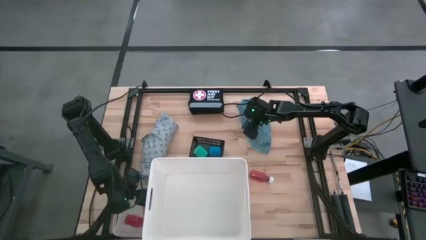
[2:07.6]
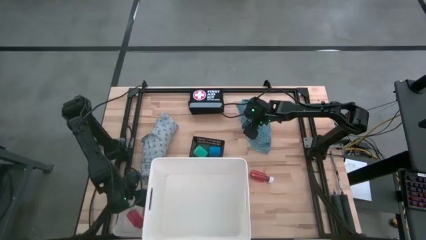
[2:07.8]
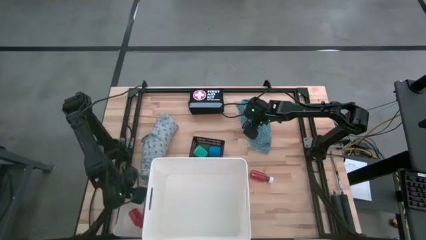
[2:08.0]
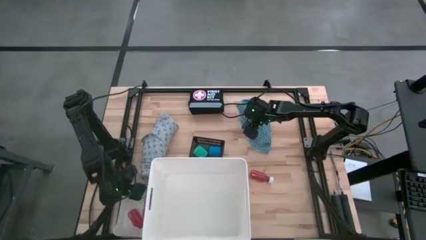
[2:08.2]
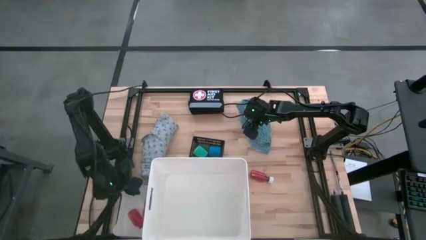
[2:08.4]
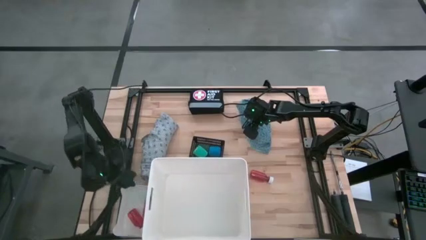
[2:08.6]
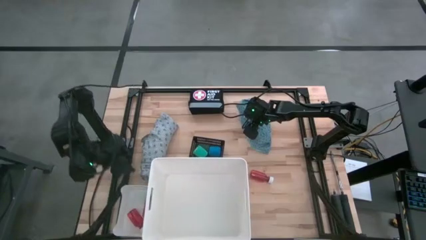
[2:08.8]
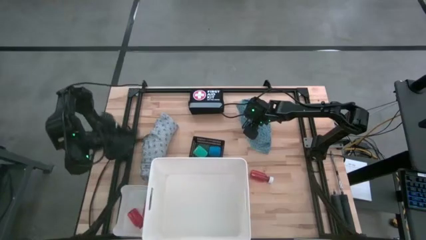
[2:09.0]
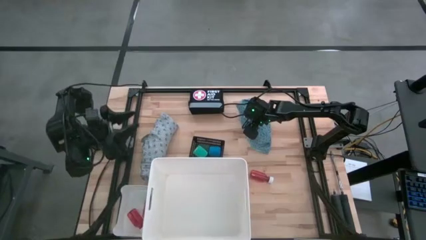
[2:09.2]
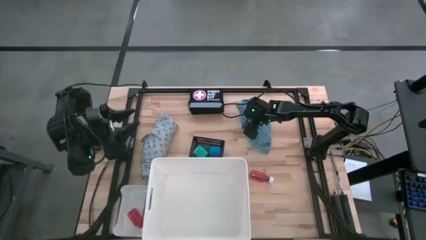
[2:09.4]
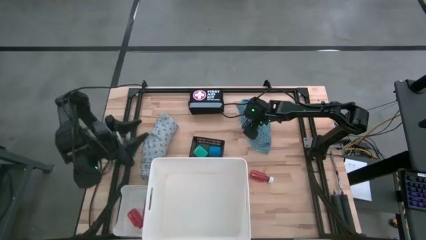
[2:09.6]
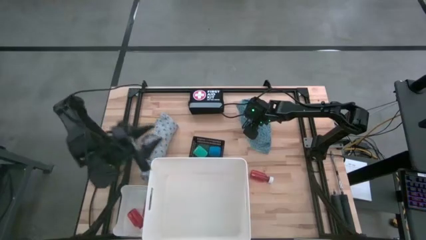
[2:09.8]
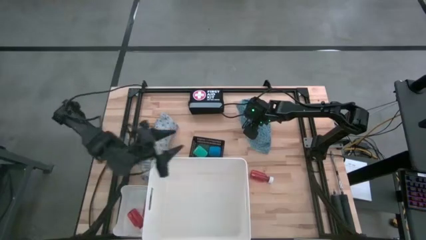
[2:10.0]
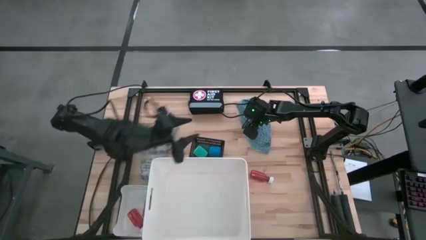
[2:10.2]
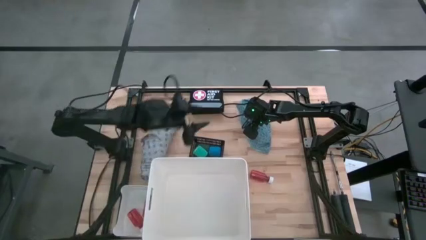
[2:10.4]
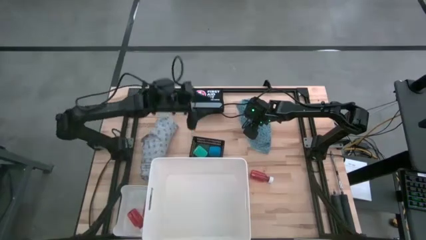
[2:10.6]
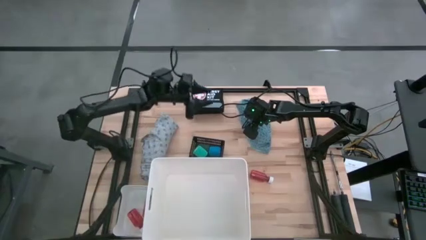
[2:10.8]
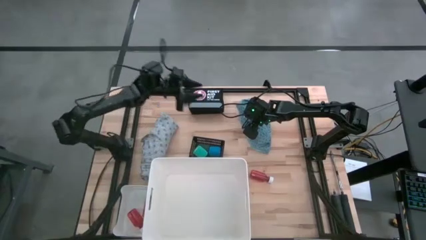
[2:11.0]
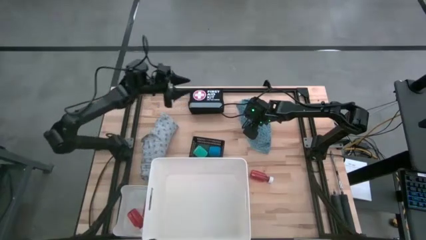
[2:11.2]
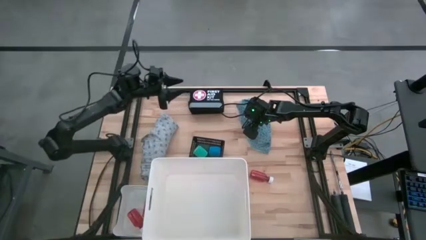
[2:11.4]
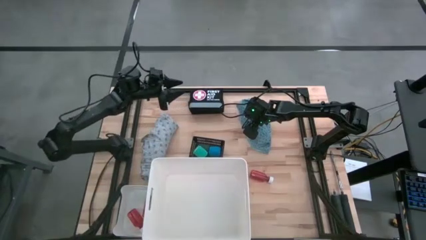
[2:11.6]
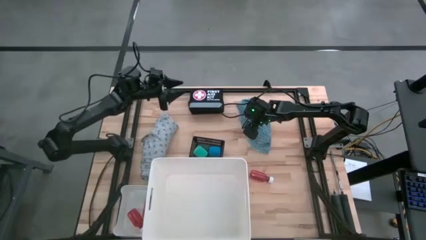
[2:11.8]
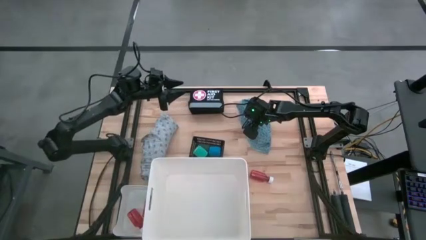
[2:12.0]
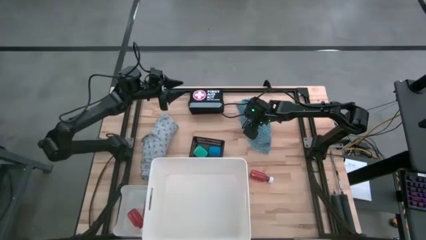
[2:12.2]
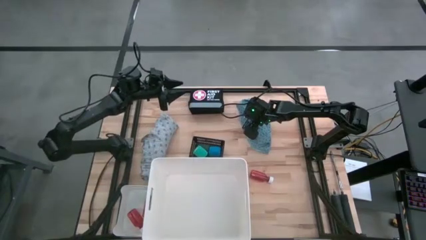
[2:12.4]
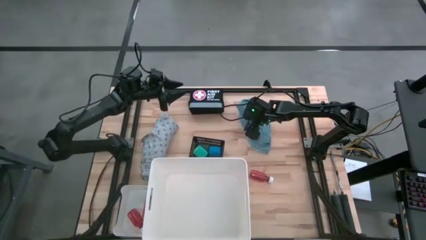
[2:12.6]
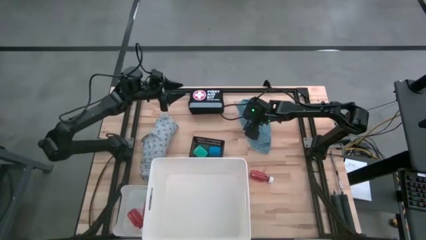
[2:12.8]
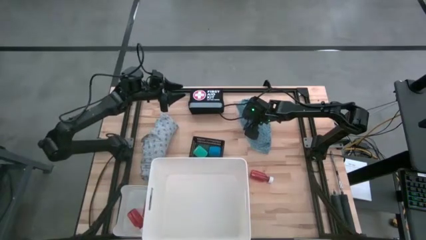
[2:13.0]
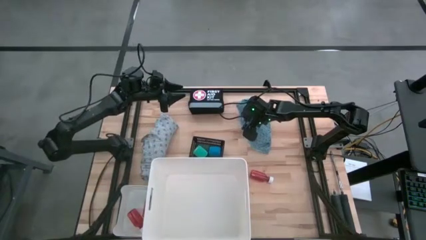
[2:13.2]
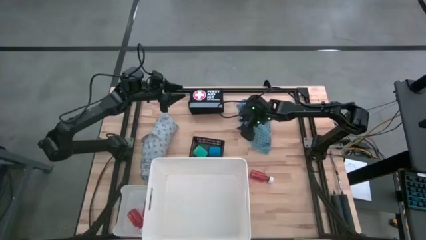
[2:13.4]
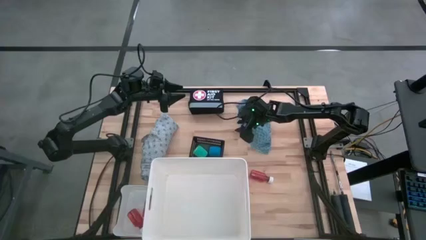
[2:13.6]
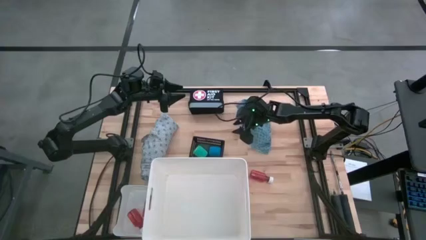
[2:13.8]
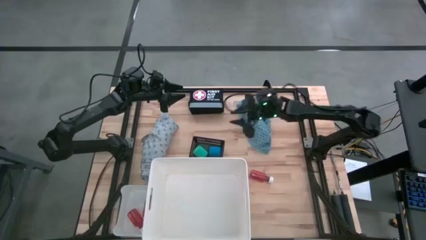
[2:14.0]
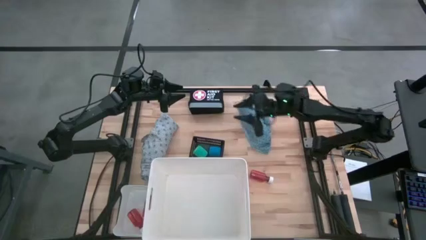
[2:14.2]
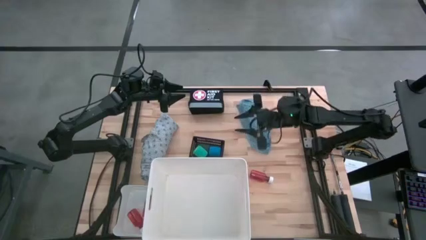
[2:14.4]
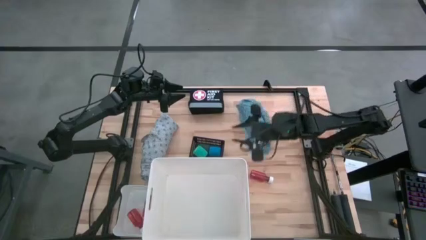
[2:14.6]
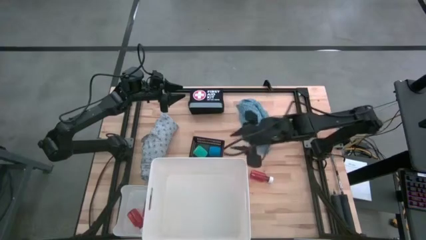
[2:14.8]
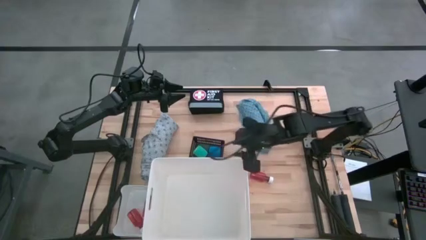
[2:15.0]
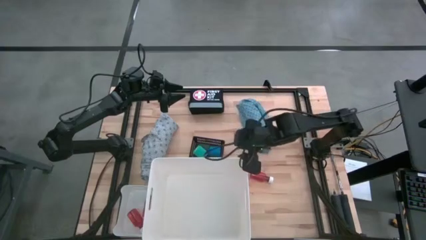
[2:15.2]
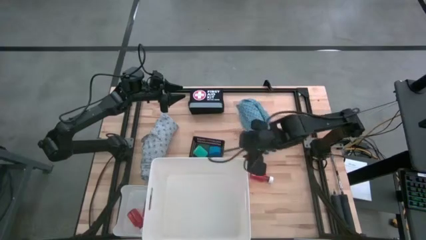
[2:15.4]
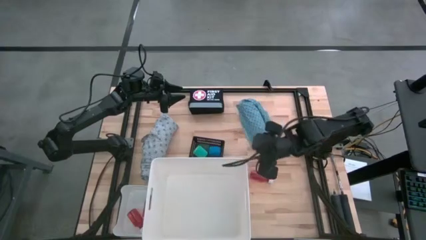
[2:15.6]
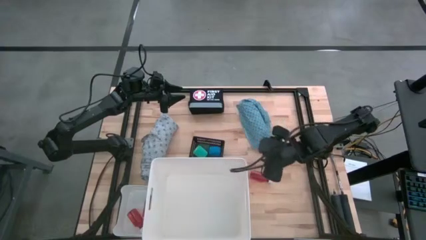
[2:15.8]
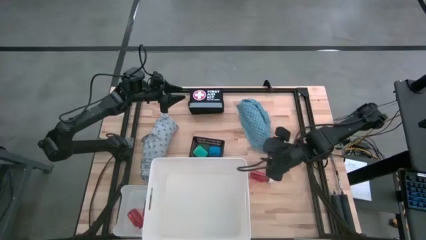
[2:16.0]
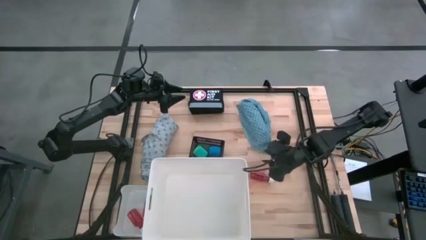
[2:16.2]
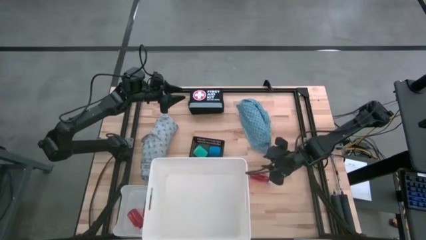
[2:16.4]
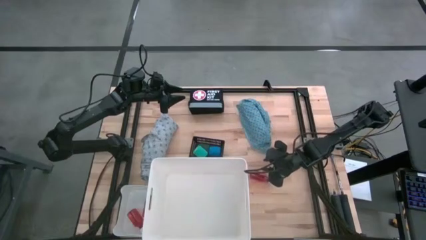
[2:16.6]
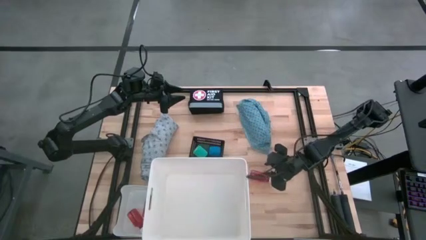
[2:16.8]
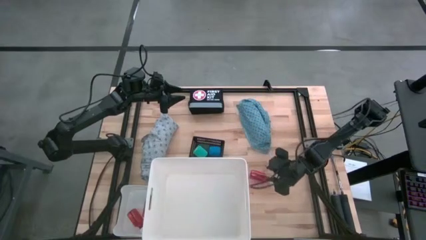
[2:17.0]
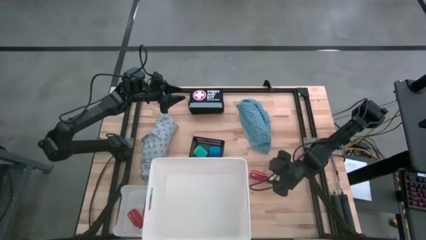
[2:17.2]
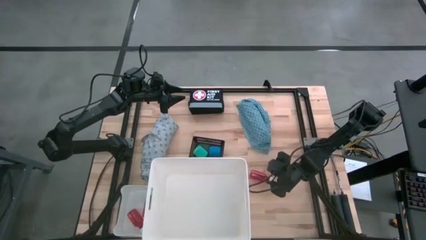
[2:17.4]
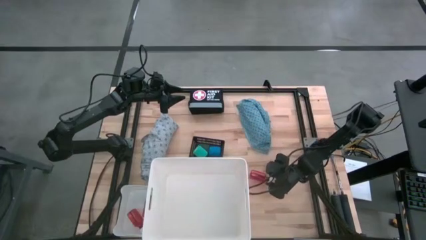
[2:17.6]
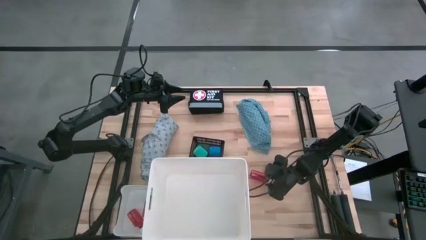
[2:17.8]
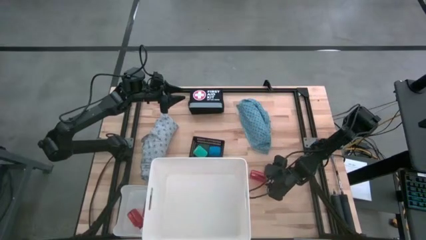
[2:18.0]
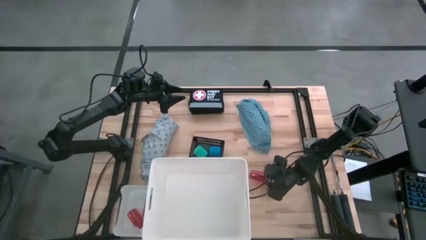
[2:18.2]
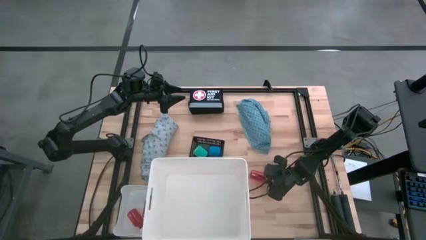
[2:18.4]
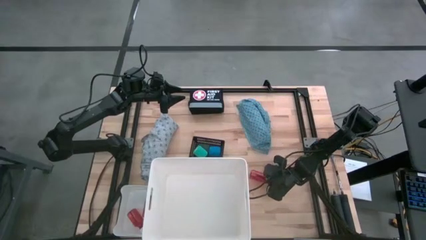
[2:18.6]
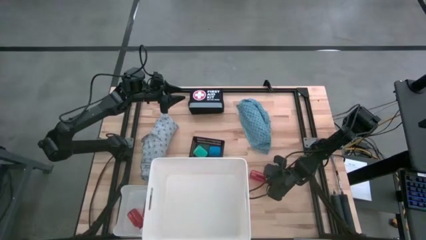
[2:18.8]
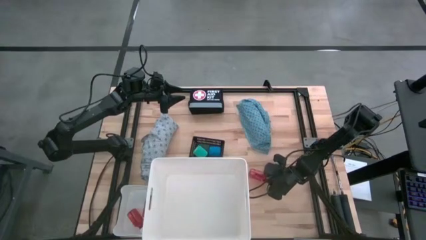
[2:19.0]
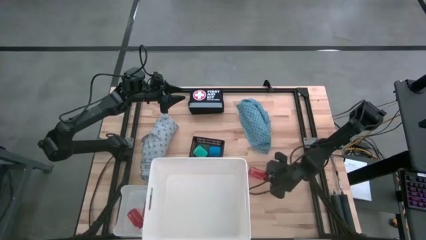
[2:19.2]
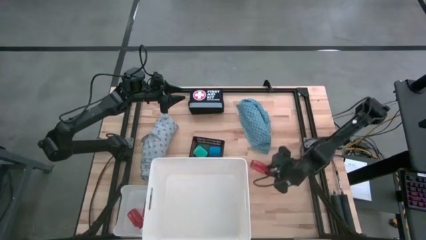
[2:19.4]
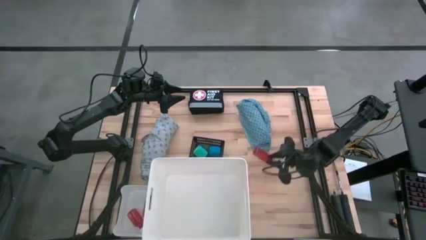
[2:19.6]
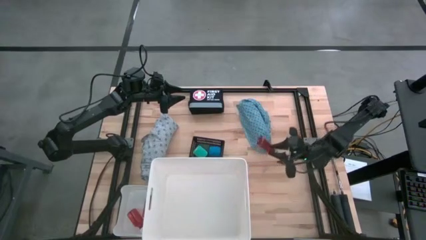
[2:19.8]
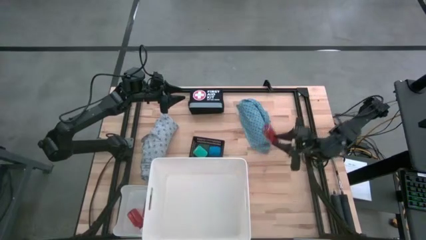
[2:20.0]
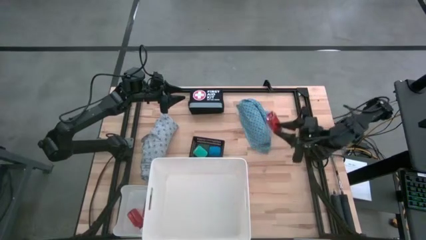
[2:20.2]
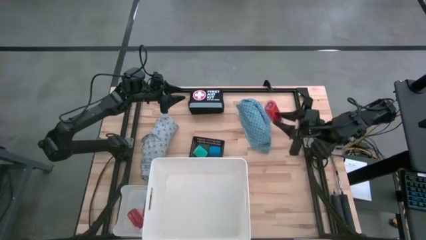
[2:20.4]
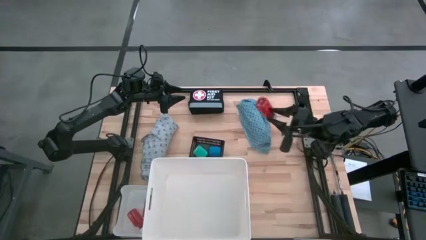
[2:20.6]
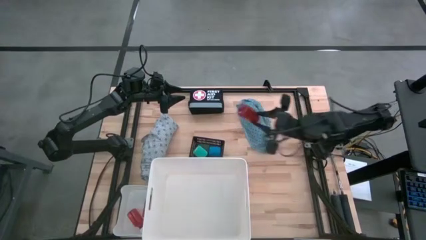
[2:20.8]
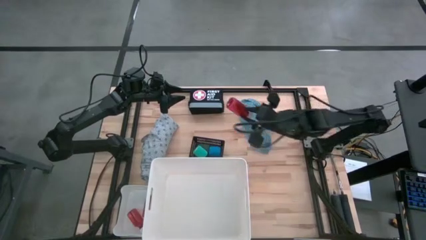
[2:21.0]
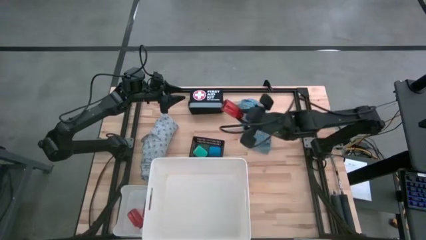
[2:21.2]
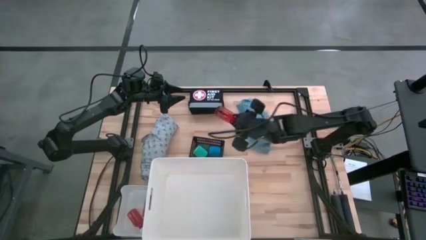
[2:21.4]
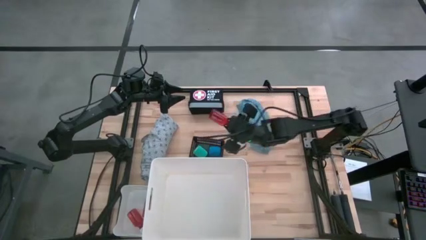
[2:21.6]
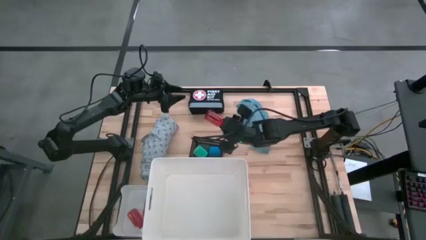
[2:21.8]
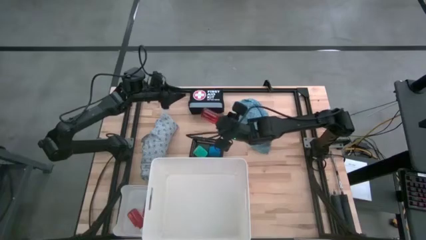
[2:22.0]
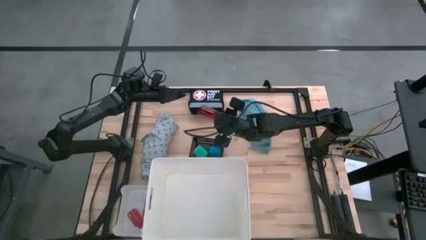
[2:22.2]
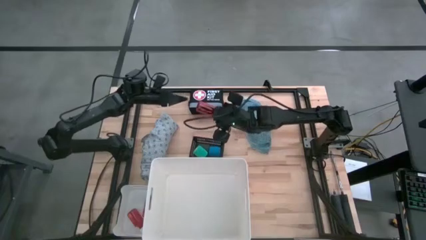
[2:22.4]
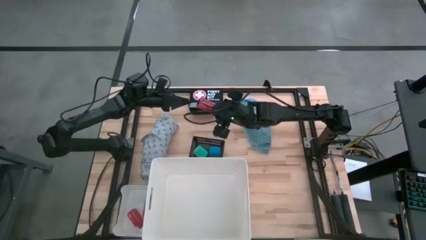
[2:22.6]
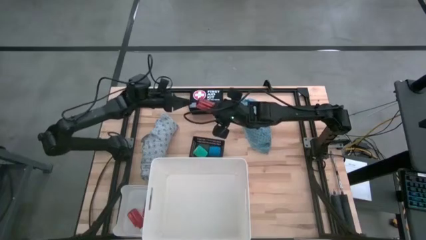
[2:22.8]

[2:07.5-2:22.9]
Task: Pick & Place Medicine items
Put the red medicine bottle into the white bin

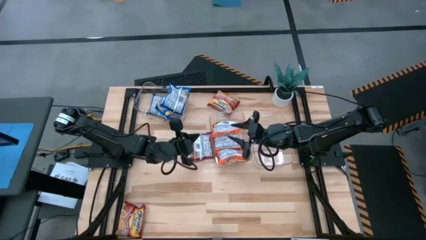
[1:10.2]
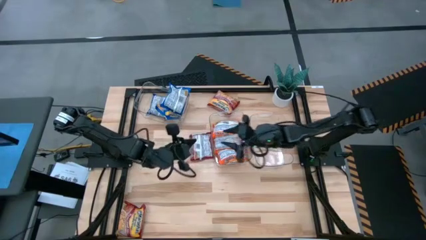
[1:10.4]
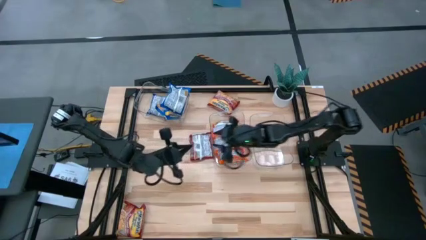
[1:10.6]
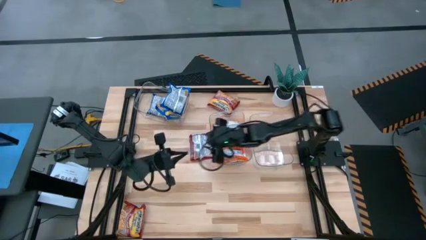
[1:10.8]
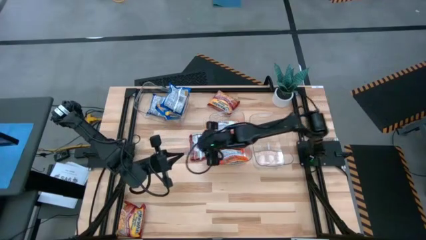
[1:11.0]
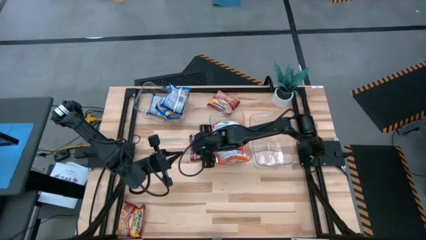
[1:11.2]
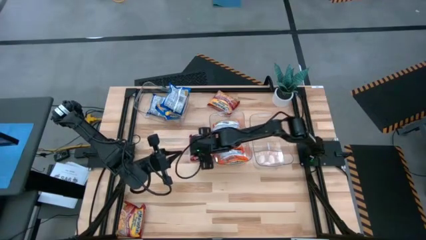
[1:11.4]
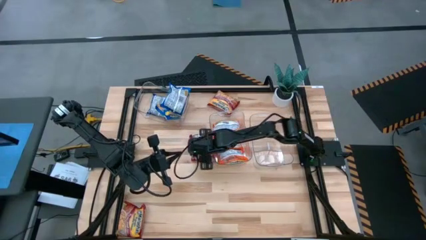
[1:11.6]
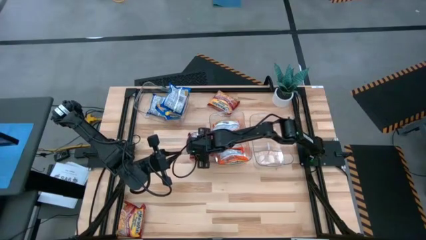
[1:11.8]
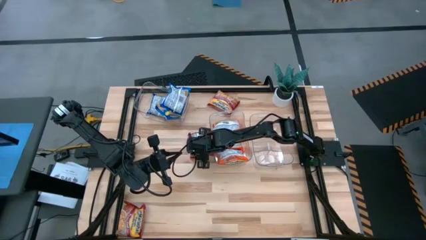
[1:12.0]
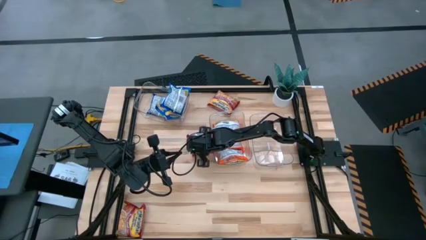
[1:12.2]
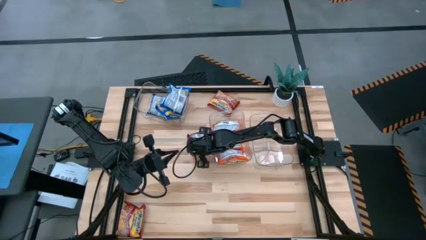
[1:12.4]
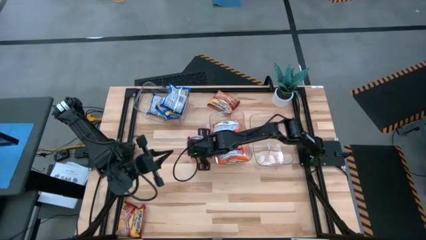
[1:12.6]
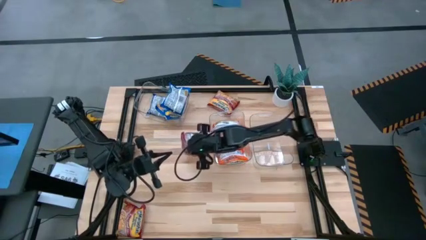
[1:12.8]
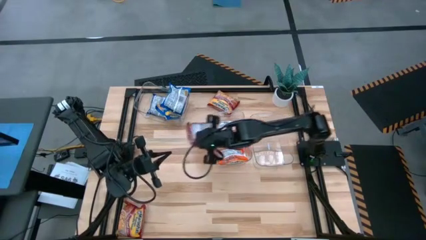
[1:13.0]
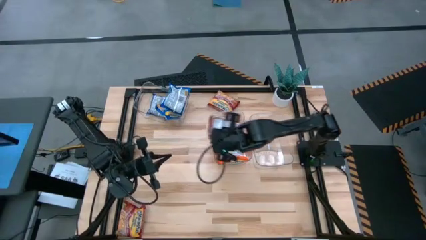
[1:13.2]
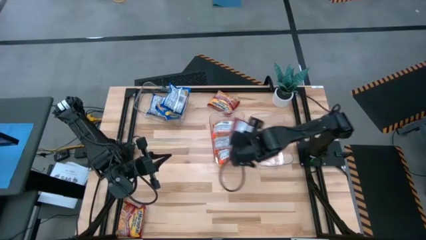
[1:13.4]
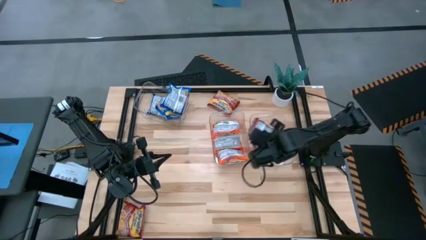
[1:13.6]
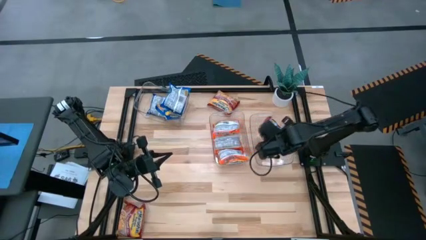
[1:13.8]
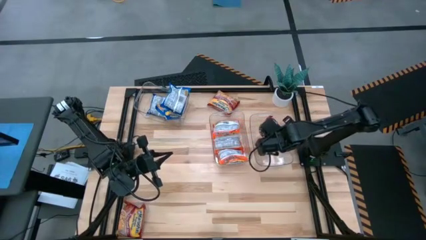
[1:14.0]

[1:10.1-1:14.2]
Task: Sort Maruchan noodles
Put the middle left red noodle pack into the bottom right transparent bin
